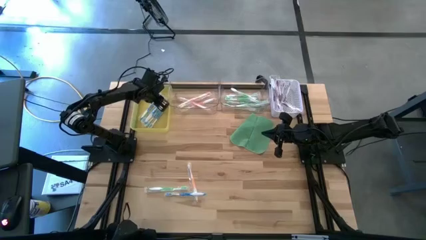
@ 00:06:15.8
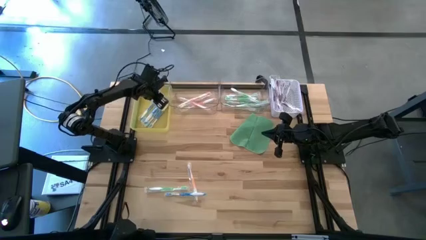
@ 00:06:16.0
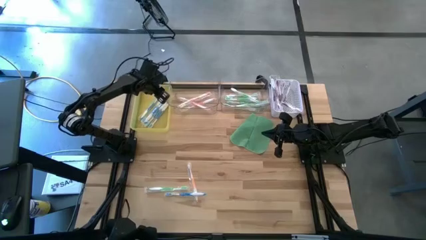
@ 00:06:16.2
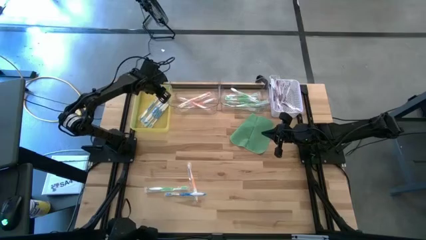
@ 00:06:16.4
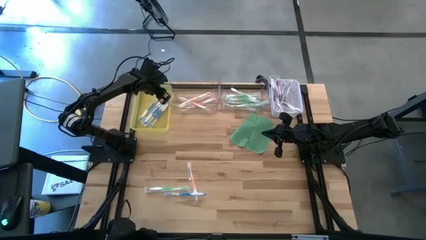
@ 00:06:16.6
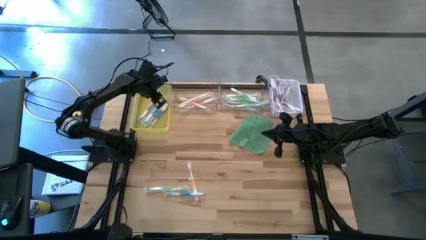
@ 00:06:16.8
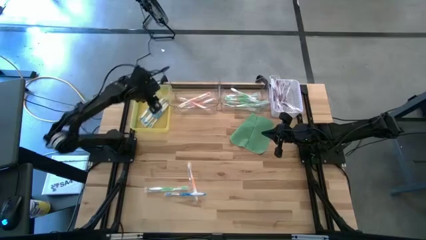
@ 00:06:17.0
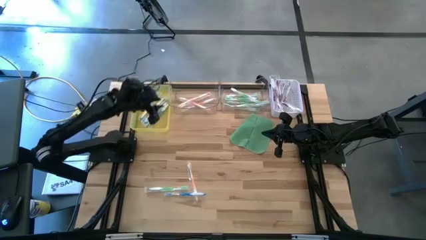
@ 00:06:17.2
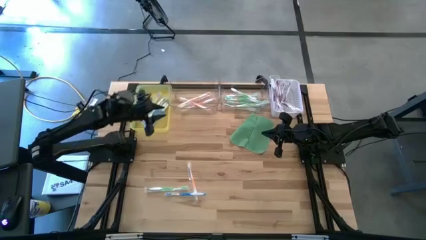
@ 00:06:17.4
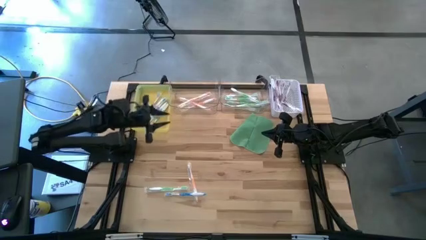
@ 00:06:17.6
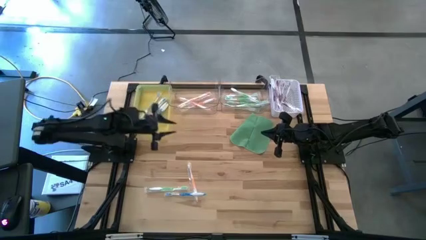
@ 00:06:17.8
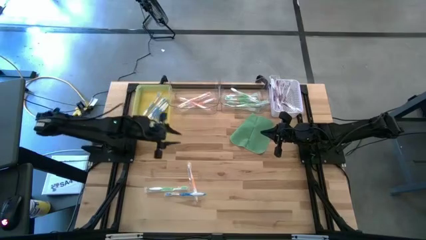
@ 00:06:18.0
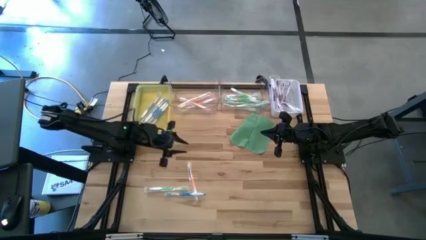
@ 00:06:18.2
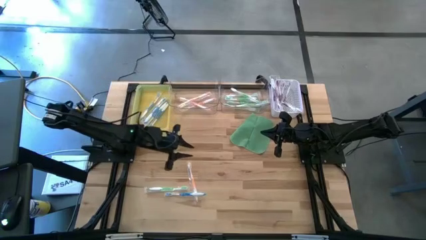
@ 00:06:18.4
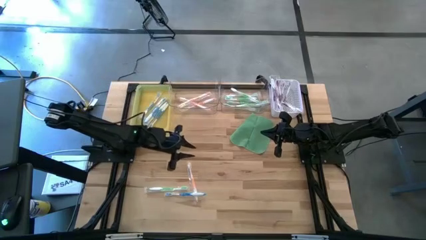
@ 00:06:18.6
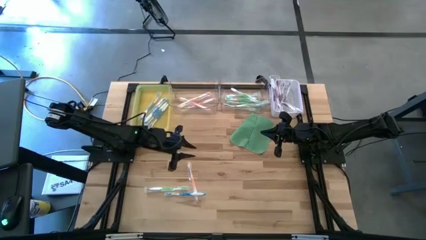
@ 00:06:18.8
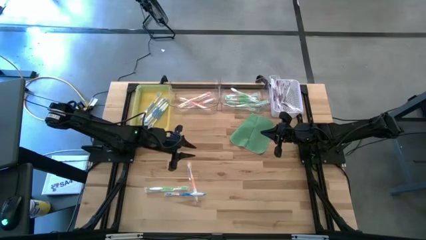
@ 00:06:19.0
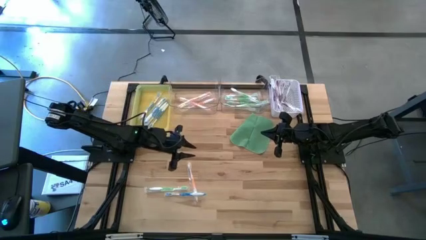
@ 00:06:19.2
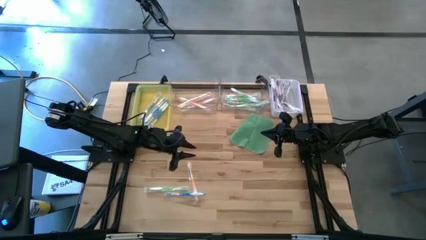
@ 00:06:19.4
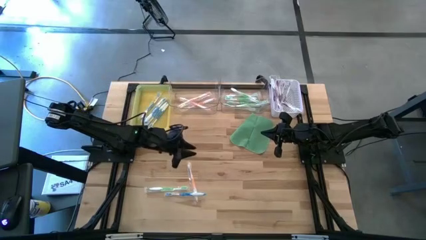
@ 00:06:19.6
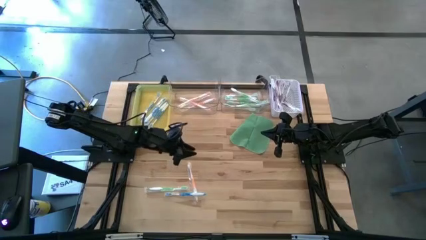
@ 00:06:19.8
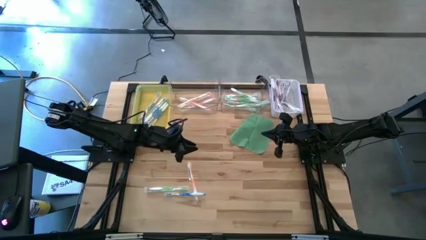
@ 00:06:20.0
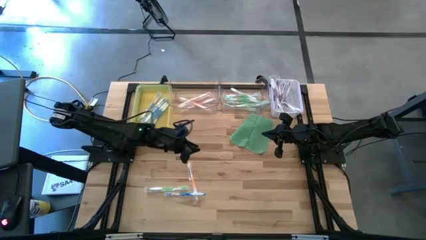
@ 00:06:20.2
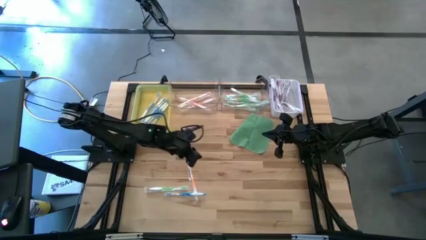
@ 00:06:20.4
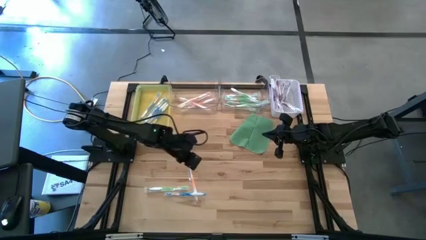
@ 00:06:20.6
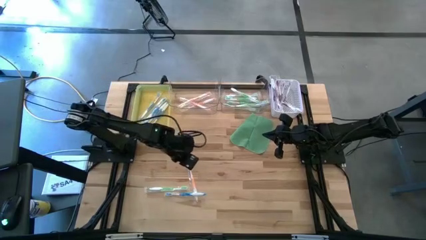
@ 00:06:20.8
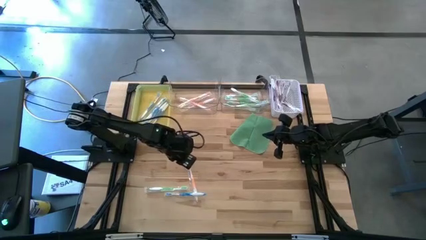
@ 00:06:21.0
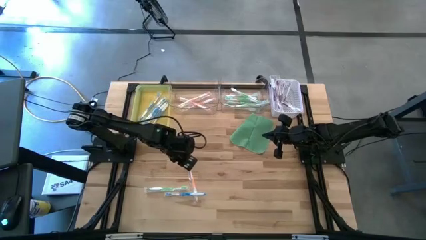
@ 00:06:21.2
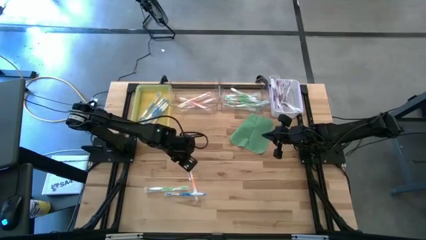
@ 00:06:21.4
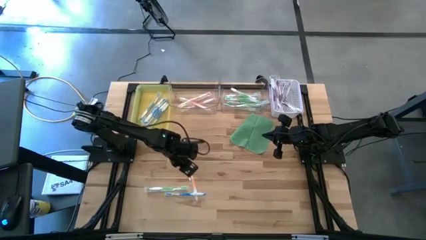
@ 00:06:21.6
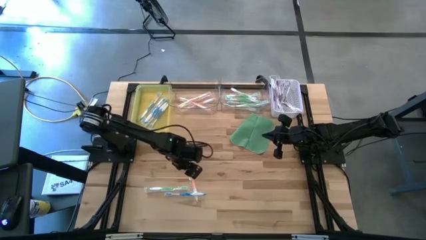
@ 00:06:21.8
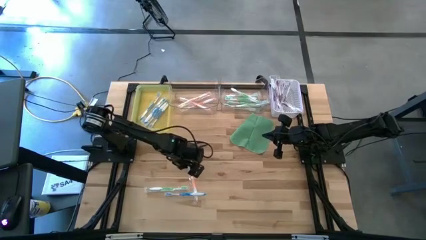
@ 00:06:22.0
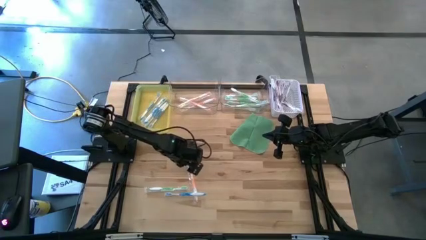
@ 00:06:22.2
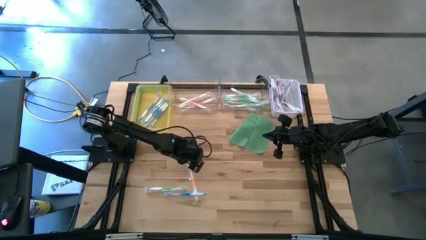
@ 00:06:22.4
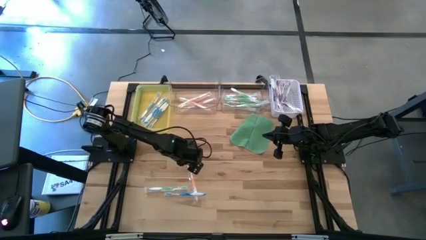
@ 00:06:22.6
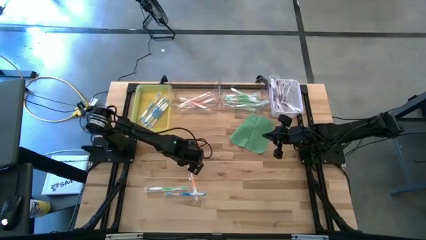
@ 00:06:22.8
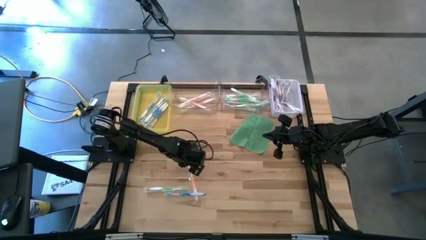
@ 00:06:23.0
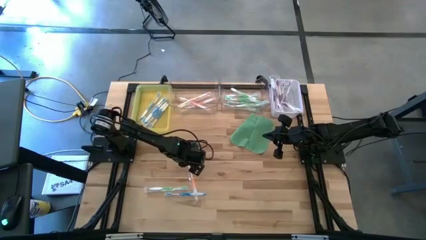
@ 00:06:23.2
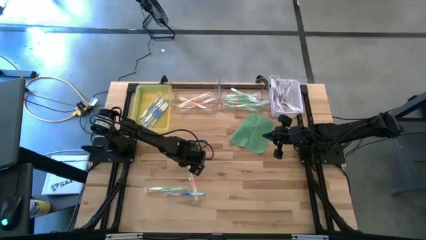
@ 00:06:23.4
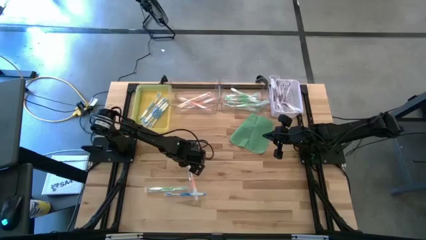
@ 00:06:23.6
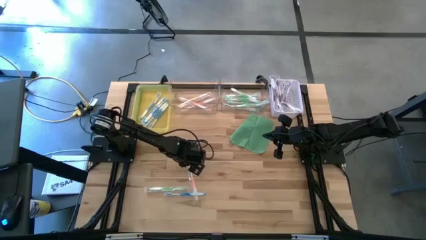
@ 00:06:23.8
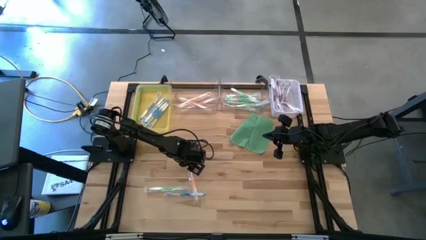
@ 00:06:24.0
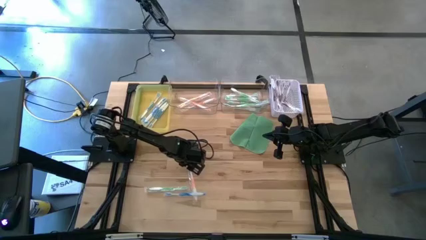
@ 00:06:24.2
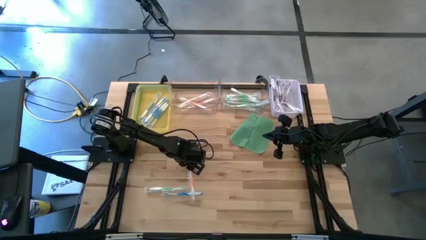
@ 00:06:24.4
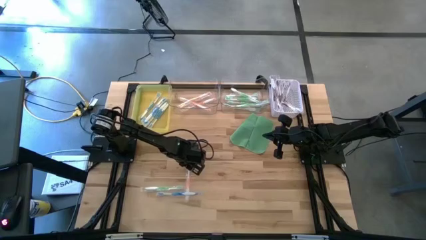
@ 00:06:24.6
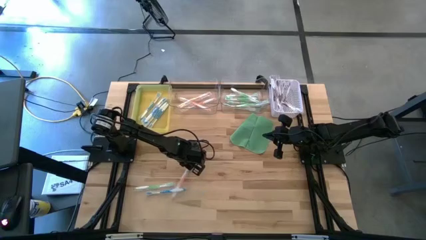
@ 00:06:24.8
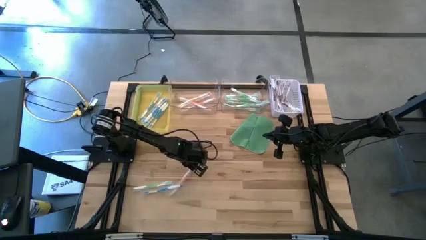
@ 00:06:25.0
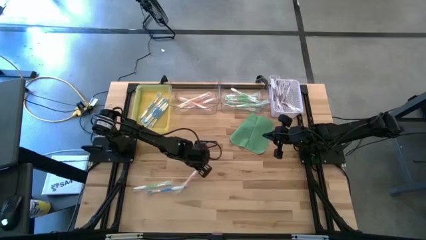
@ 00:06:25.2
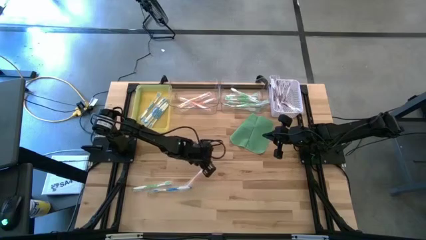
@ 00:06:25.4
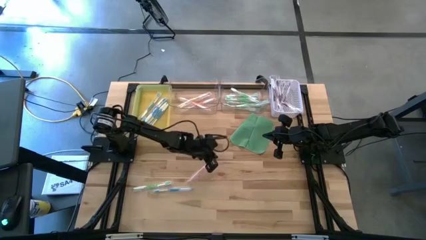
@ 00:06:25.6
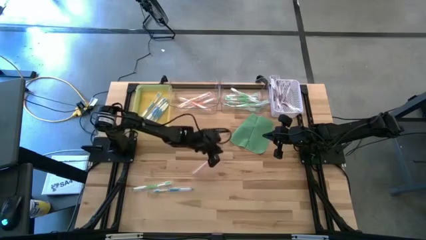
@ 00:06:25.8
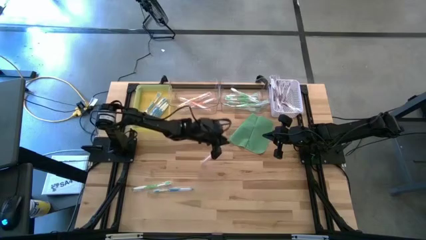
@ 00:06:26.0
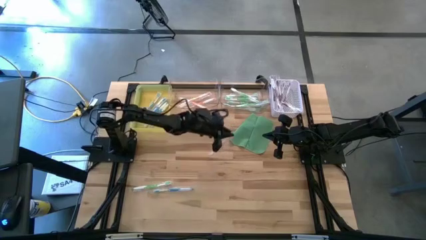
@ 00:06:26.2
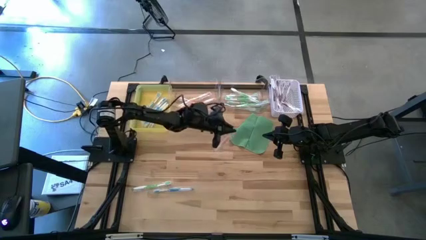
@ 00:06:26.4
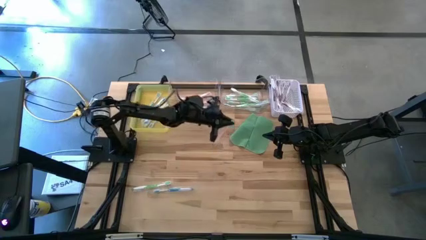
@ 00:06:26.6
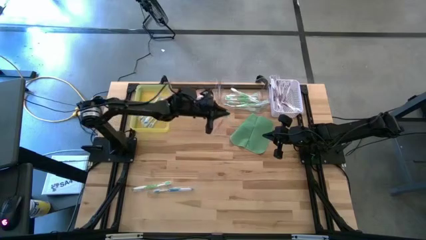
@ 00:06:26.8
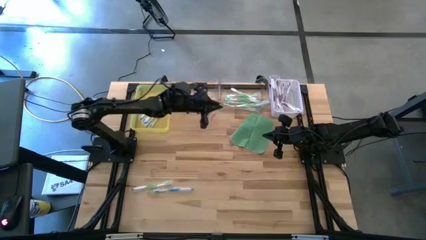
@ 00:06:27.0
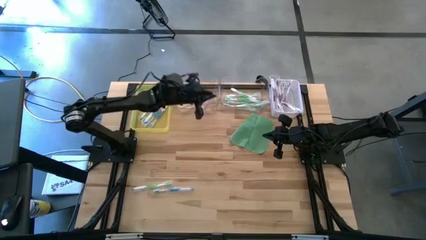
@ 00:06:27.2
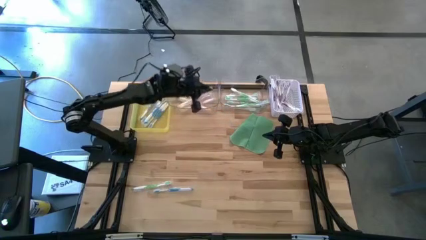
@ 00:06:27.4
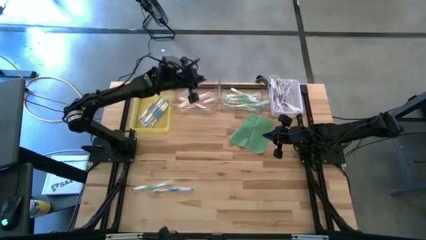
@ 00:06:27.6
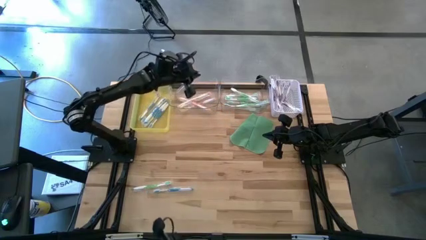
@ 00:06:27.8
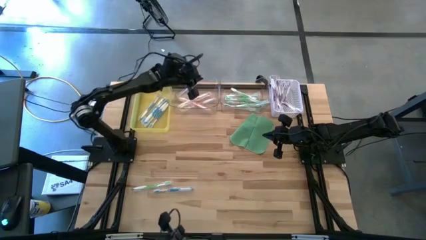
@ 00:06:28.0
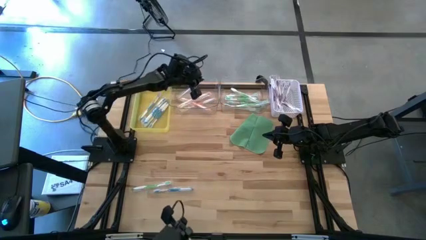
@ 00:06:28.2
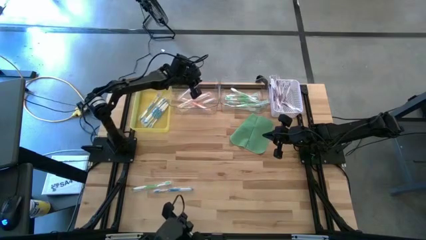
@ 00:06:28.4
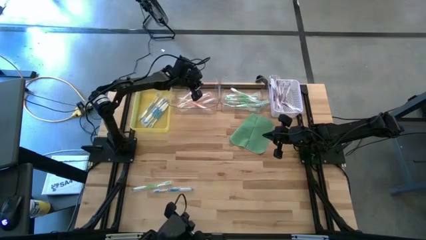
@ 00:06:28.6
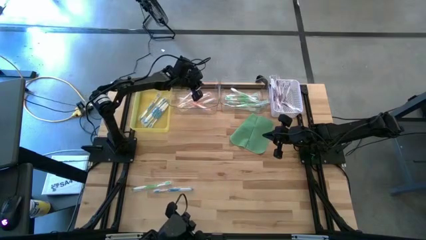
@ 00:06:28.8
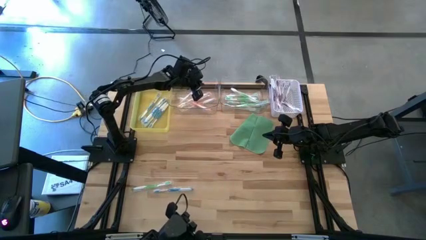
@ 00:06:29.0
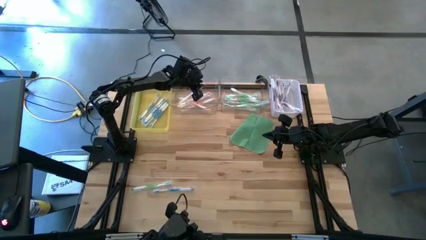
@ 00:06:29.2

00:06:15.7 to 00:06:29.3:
Task: Pick & Place Toothbrushes
Put the orange toothbrush into the left transparent bin

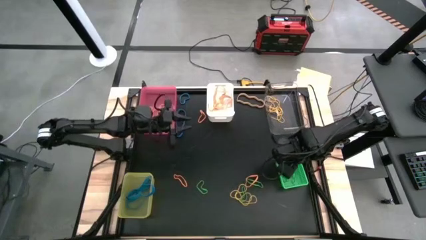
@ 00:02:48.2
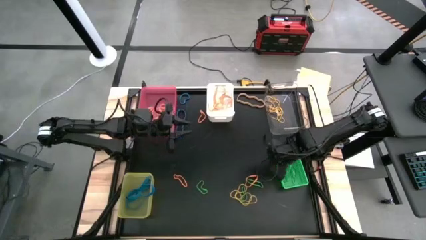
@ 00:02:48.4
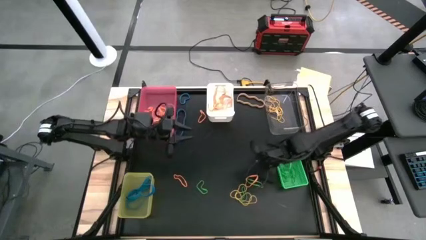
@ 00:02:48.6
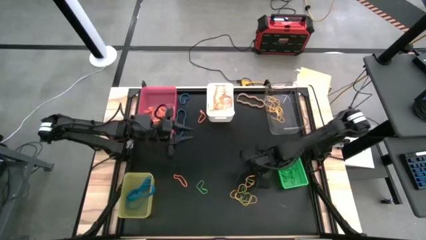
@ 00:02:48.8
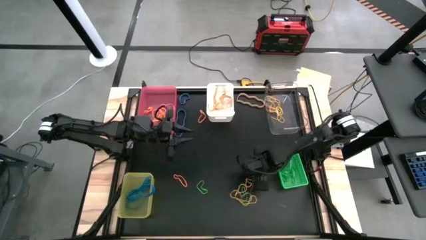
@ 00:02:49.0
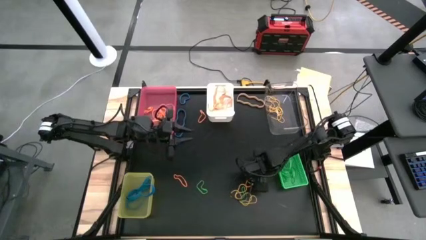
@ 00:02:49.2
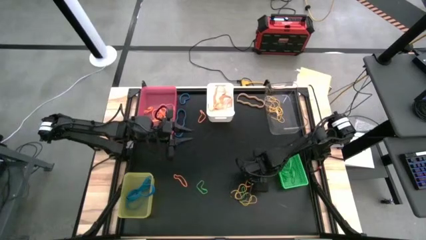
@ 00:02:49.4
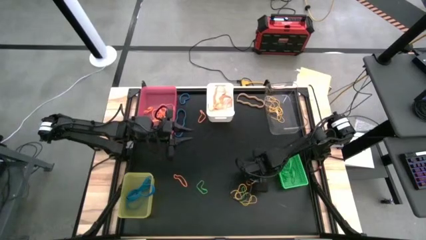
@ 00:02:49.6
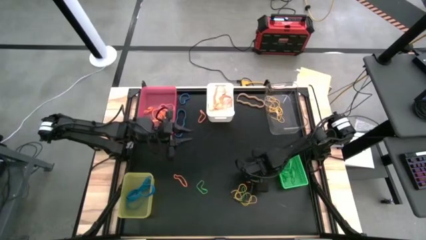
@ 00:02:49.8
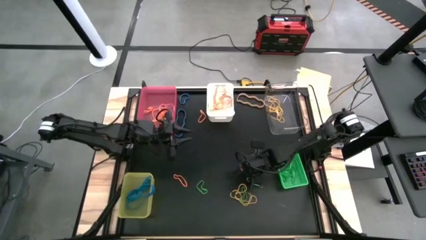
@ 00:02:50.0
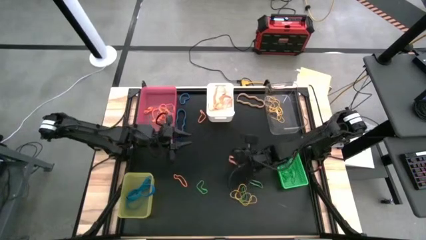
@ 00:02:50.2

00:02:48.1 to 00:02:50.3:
Task: Sort rubber bands into baskets
Put the orange rubber band into the pink bin
